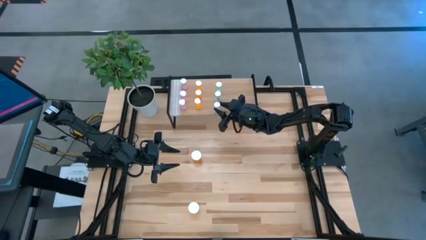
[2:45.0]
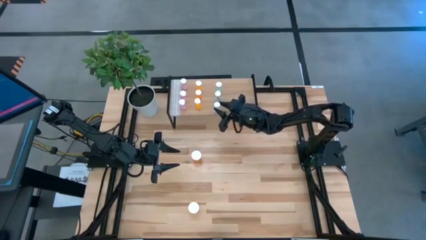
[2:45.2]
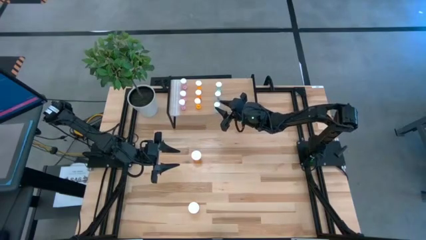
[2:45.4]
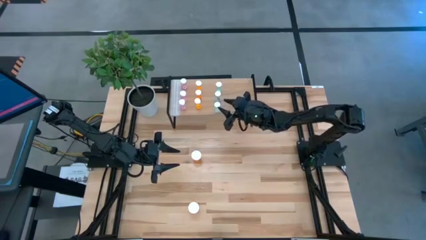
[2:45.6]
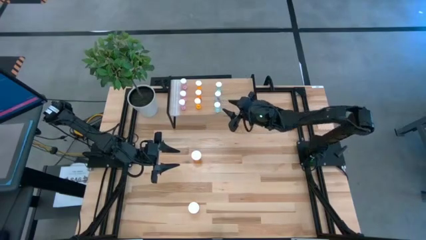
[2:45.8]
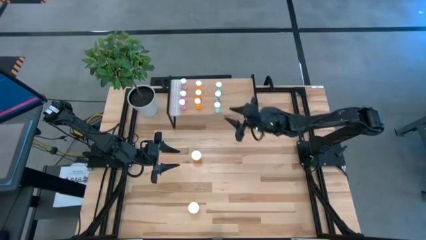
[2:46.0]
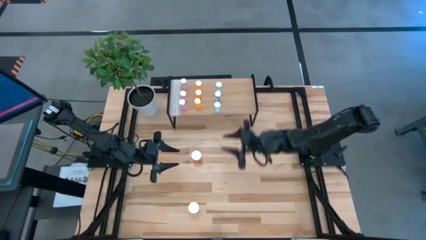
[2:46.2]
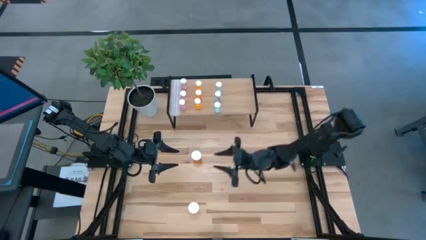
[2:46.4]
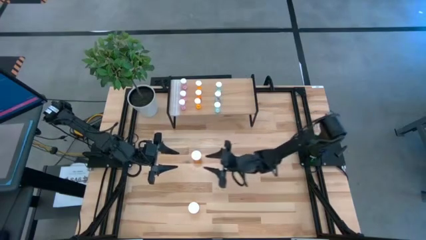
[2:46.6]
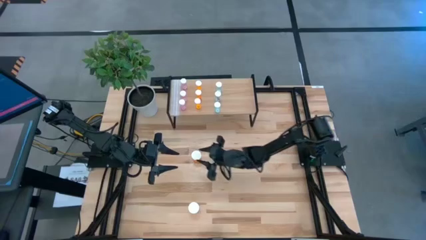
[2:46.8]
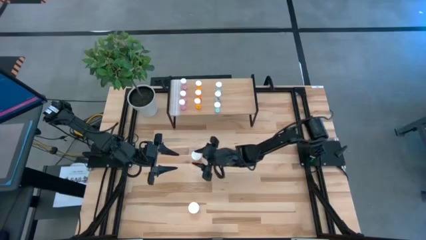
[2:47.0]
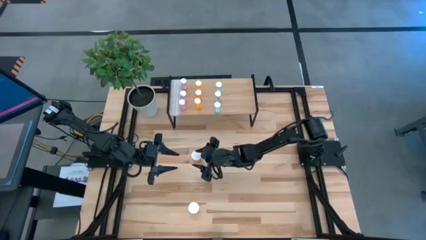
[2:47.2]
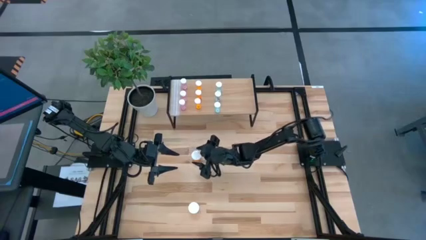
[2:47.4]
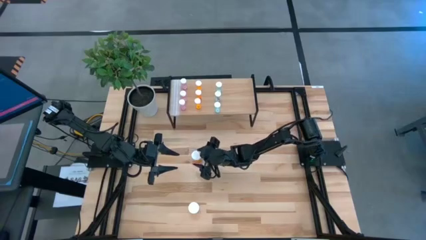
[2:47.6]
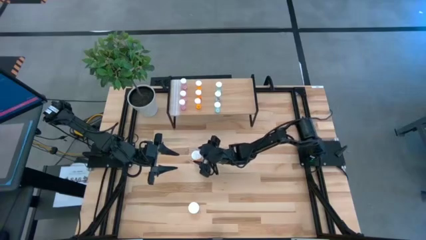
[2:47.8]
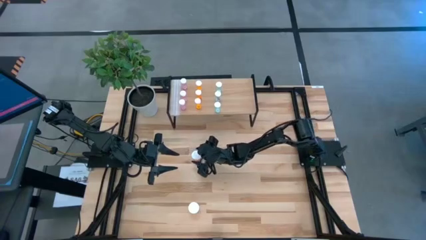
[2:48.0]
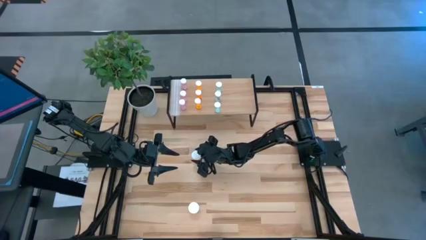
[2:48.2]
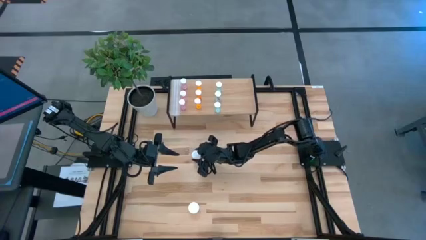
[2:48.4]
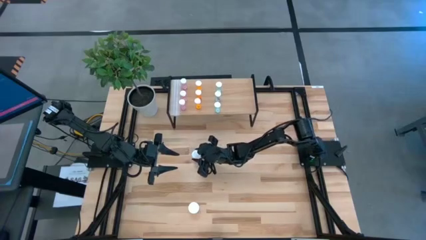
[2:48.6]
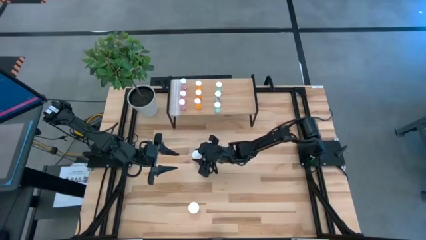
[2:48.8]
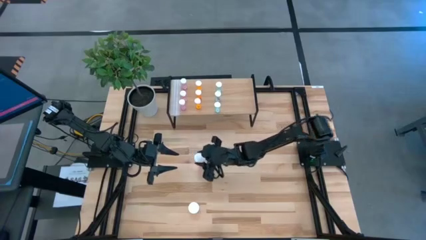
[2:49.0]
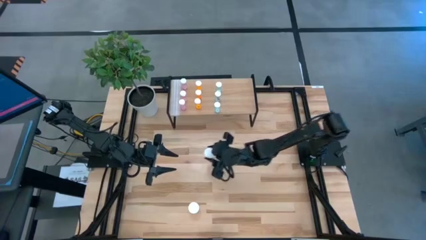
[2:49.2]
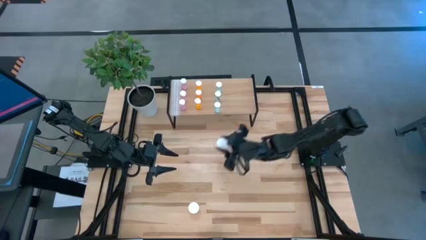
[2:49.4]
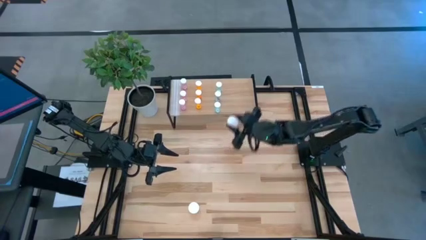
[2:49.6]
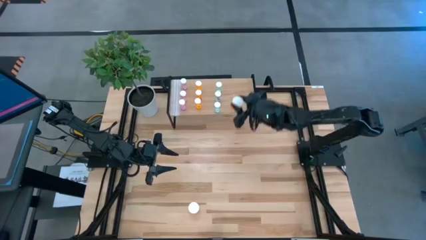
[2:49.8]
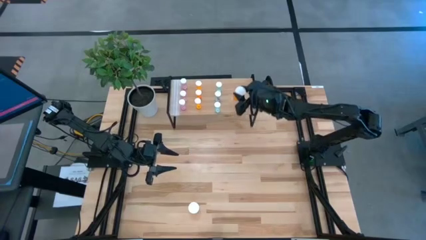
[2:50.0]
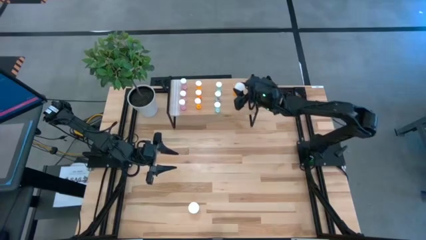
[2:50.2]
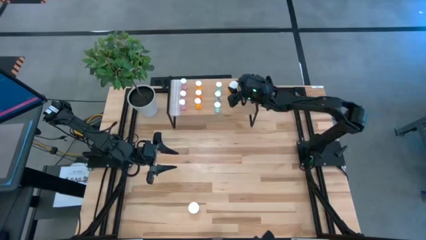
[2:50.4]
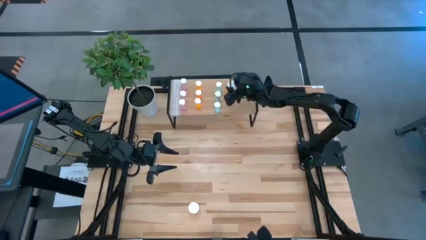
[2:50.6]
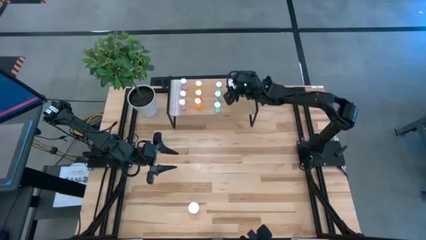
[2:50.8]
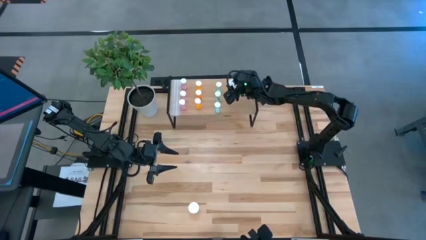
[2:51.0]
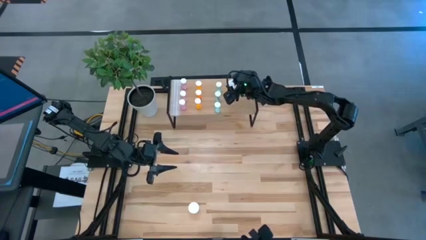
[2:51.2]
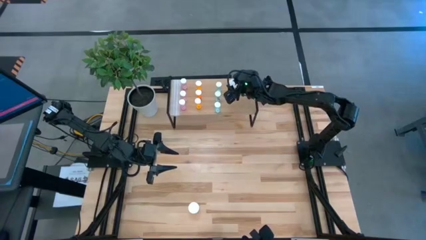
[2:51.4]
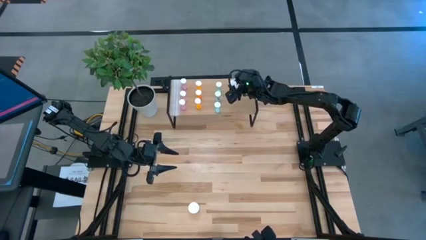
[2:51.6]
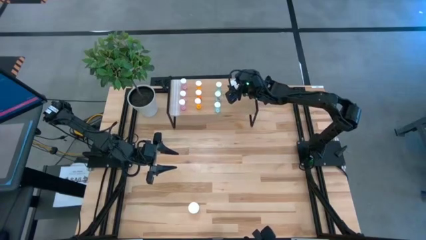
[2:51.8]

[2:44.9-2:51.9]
Task: Pick and place medicine bottles onto shelf by color
Put the top large orange pill bottle on the shelf

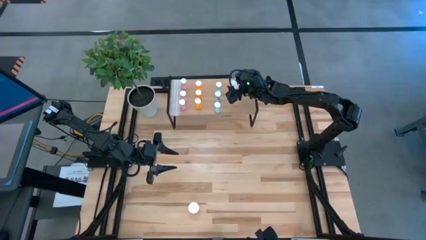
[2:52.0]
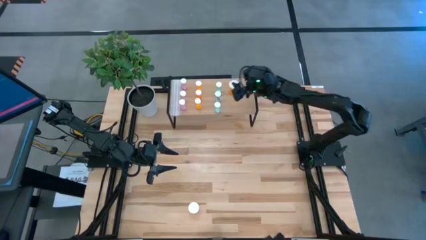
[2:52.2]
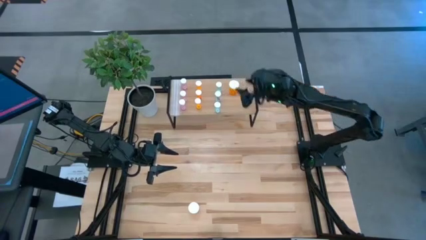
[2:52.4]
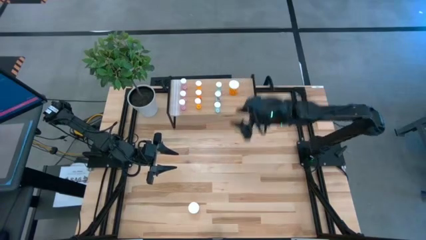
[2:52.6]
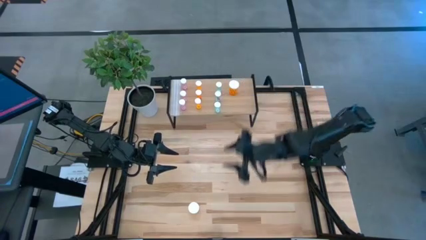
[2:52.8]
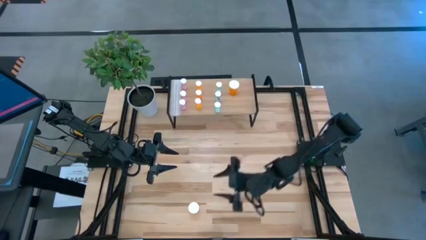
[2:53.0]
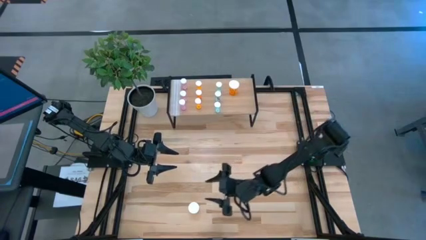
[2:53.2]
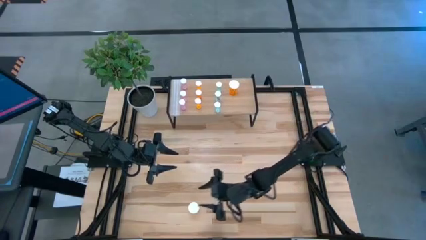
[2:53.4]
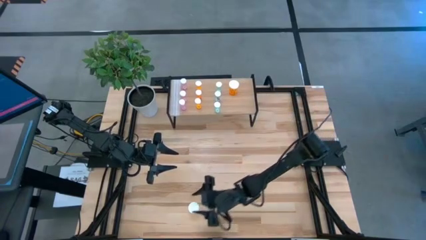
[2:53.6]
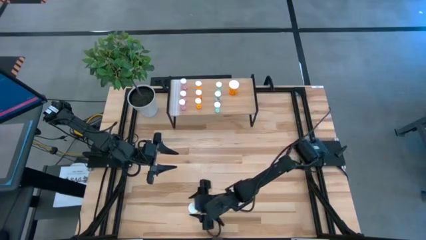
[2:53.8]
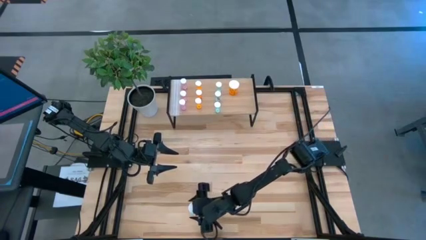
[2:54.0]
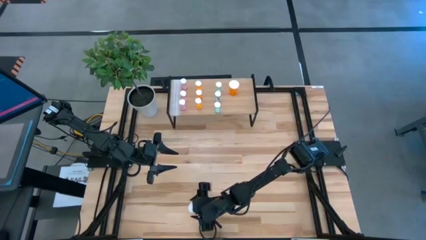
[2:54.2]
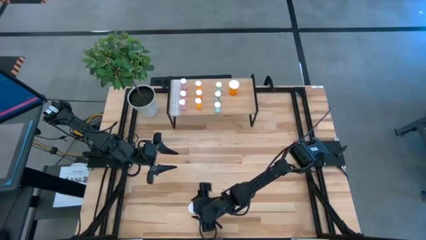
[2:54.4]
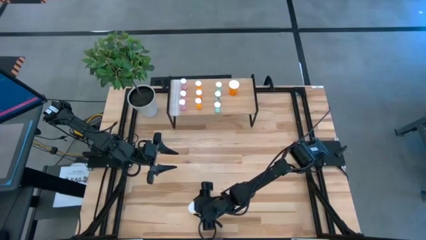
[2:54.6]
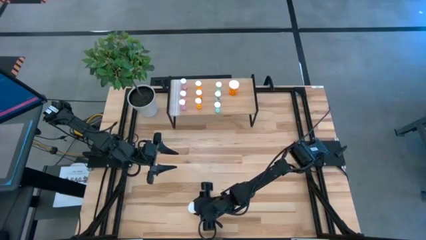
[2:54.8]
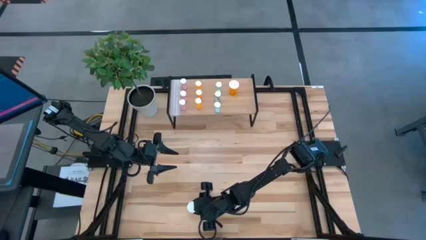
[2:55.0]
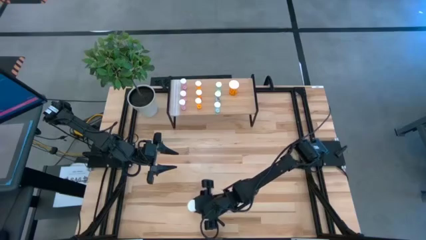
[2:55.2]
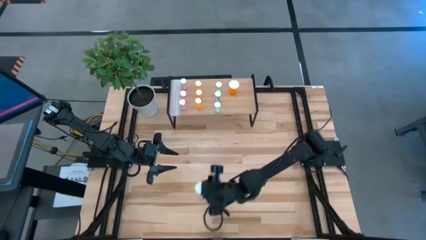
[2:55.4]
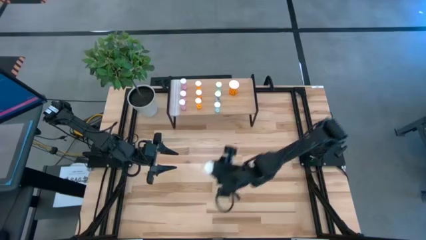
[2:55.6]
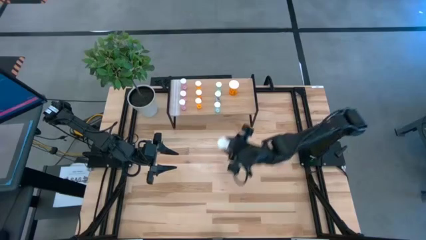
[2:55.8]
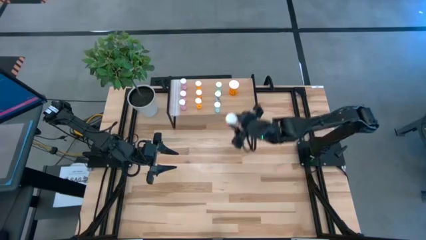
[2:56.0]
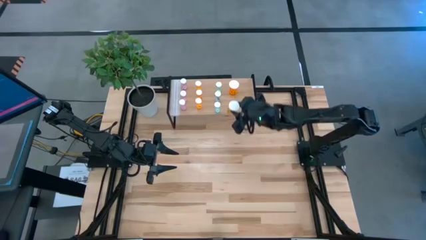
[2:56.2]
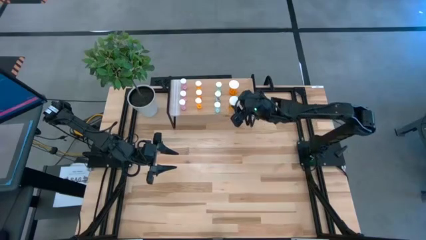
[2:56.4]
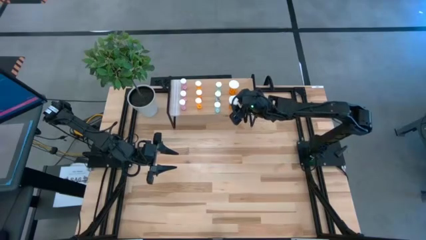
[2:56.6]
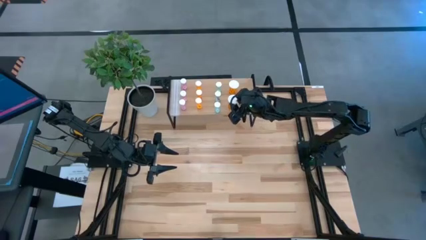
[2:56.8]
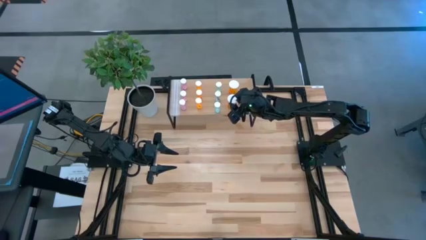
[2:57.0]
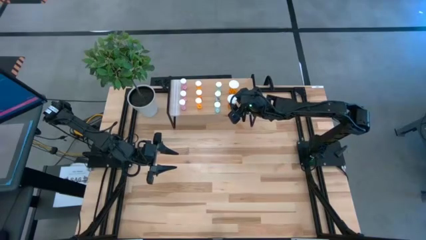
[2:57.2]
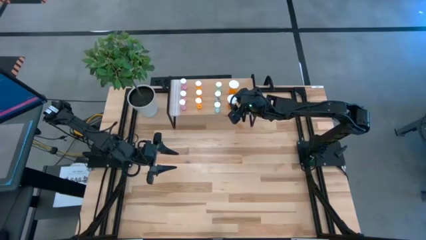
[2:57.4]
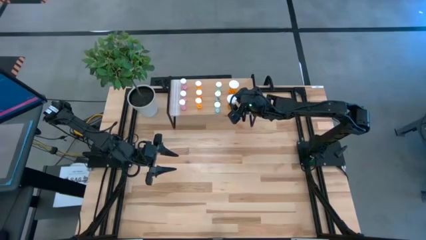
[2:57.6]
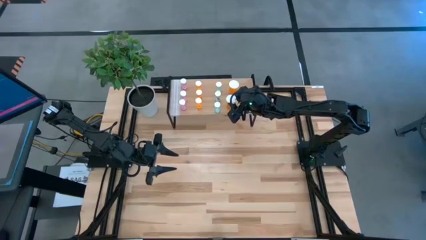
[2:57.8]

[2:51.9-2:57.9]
Put the large orange pill bottle on the shelf aligned with the other large orange pill bottle

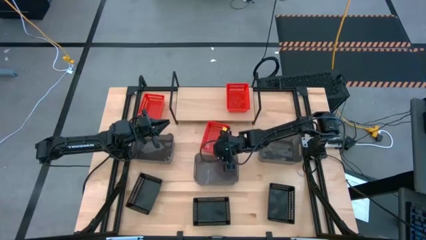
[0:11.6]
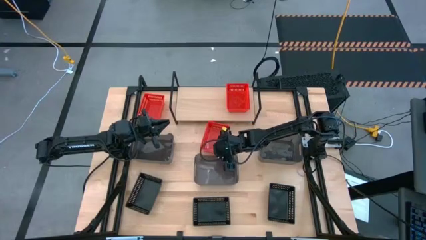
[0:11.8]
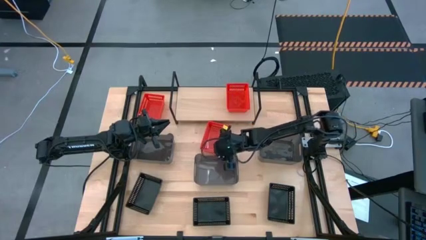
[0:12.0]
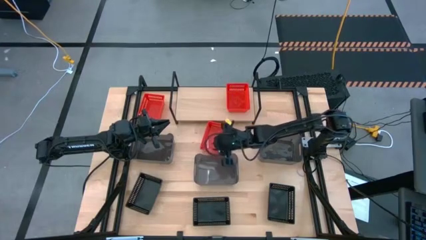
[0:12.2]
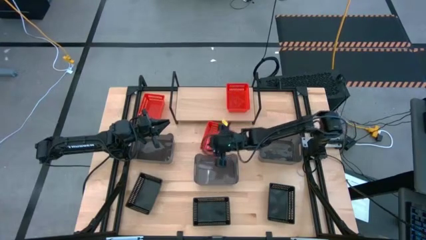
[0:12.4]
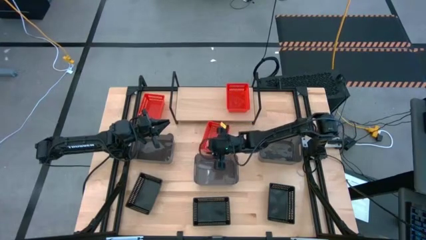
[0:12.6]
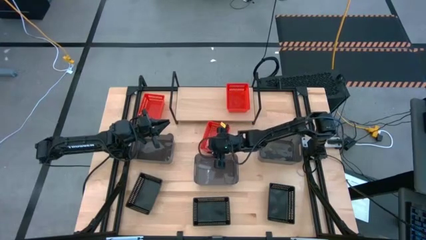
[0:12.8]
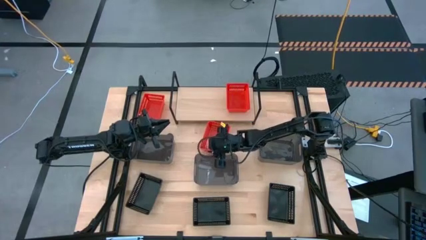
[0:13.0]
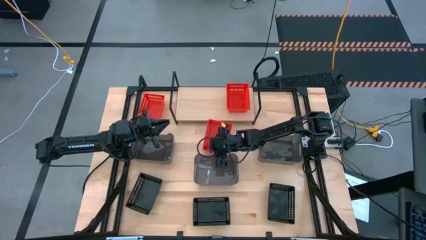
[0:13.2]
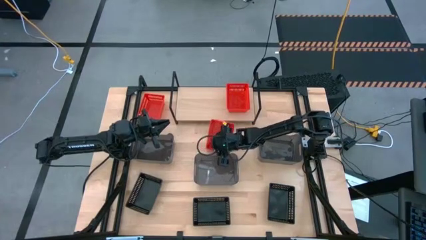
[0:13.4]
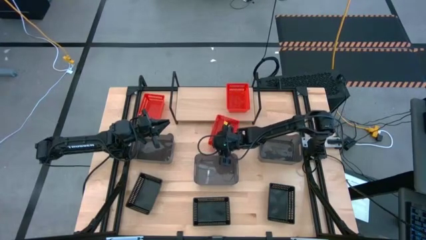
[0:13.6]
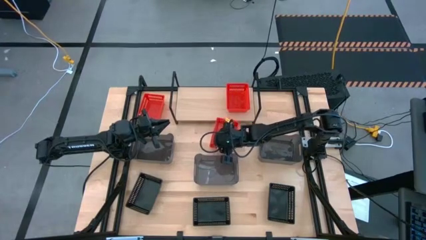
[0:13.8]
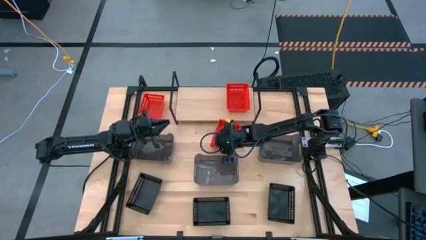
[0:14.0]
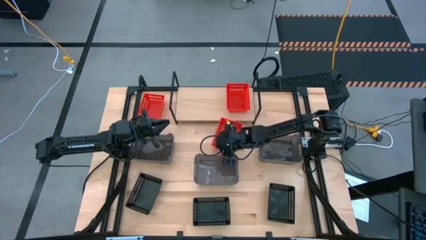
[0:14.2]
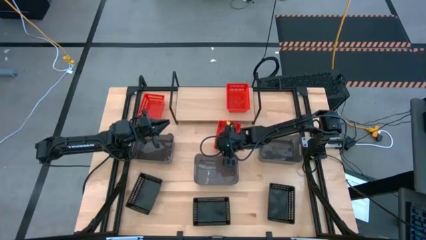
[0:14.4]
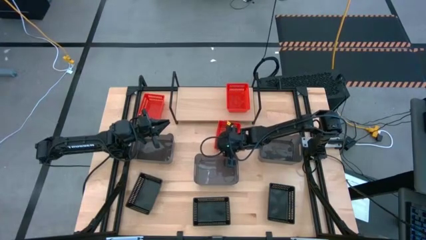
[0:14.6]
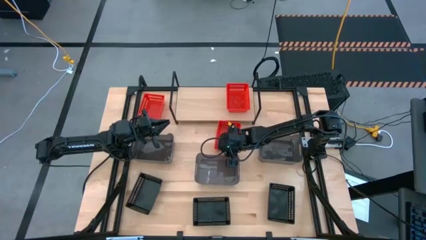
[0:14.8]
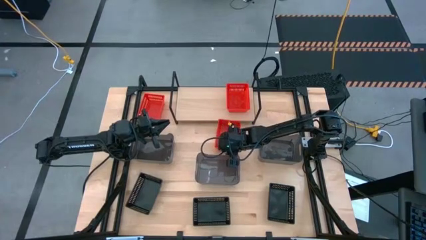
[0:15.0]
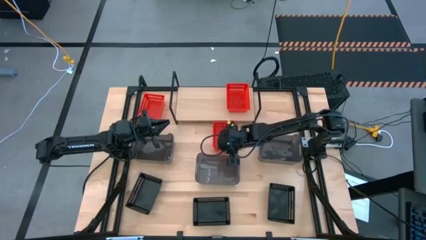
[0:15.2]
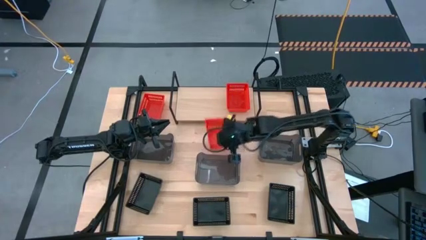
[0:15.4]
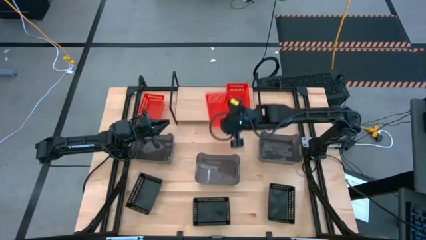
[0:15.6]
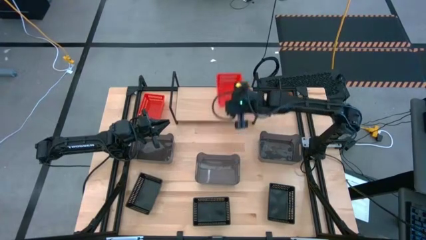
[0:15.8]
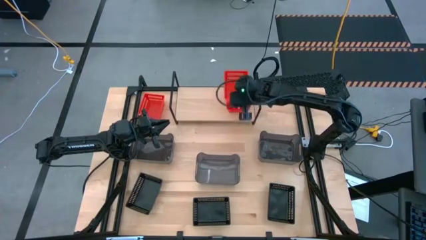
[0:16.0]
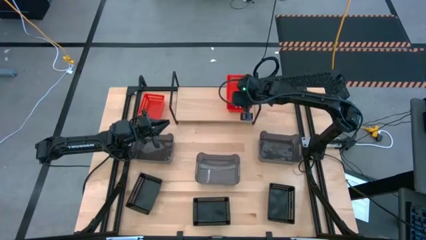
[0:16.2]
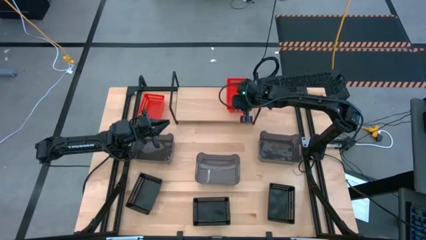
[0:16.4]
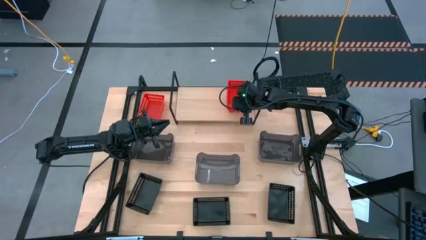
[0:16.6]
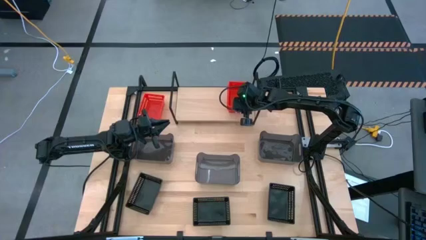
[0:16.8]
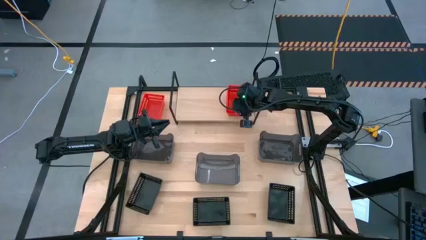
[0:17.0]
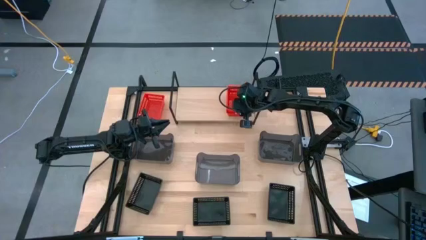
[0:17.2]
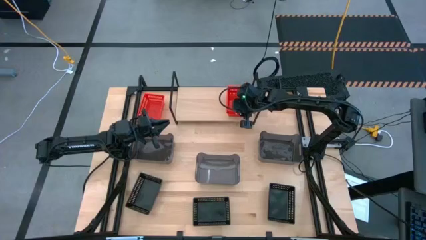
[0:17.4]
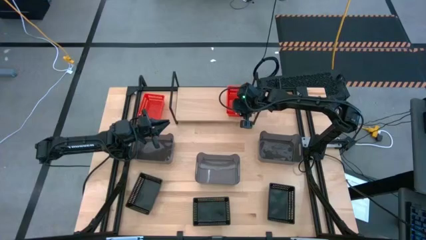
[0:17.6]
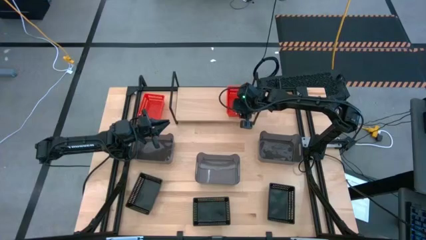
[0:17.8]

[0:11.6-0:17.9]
Task: Stack baskets on shelf by color
Stack the right red bin on top of the other red bin on the shelf
